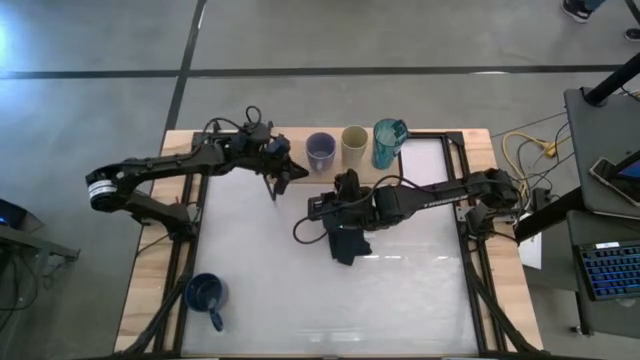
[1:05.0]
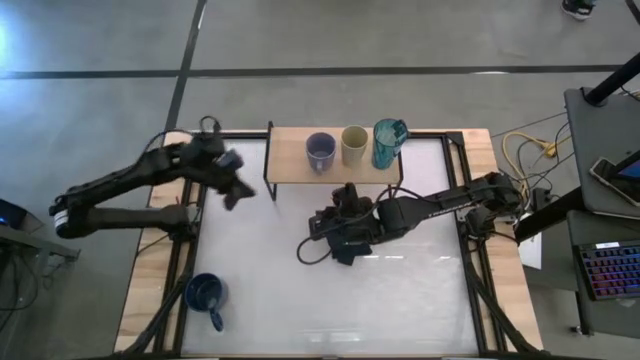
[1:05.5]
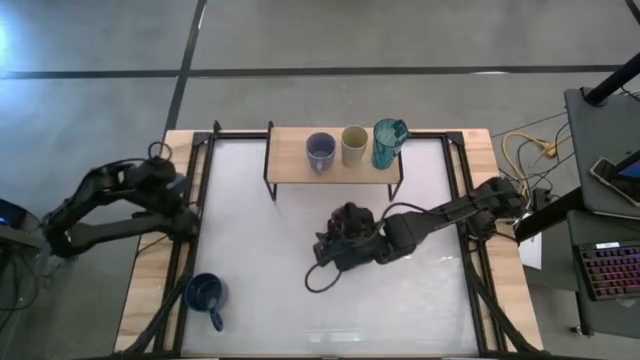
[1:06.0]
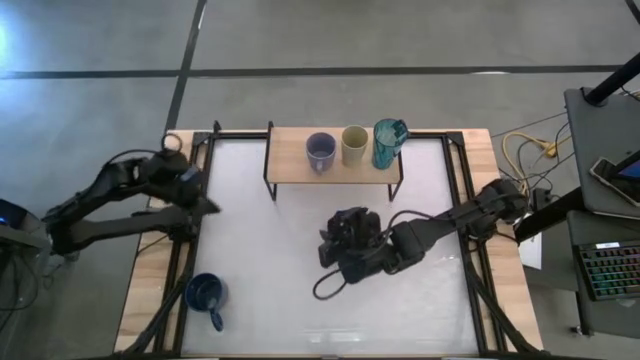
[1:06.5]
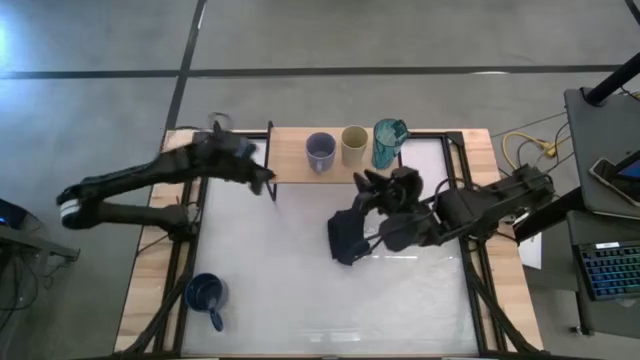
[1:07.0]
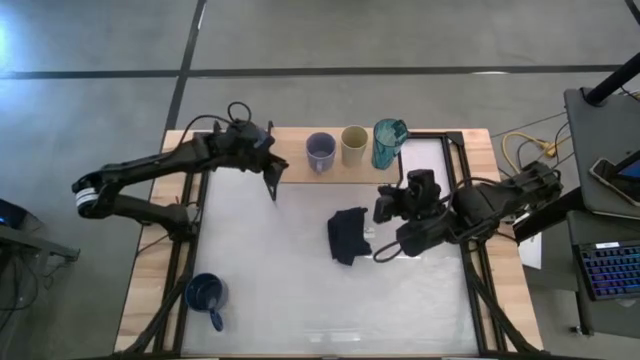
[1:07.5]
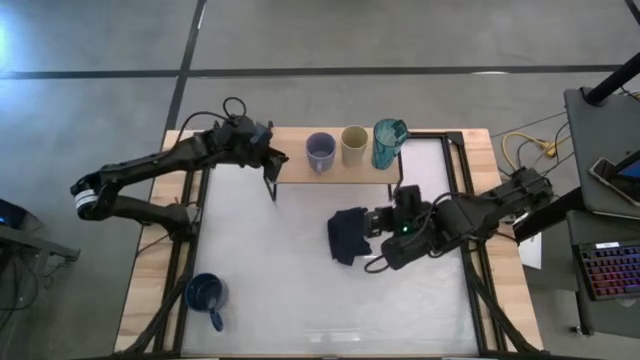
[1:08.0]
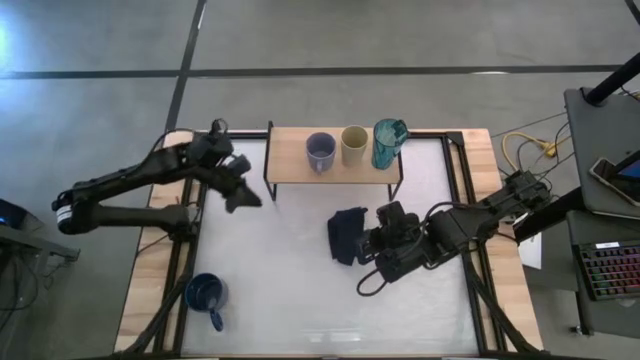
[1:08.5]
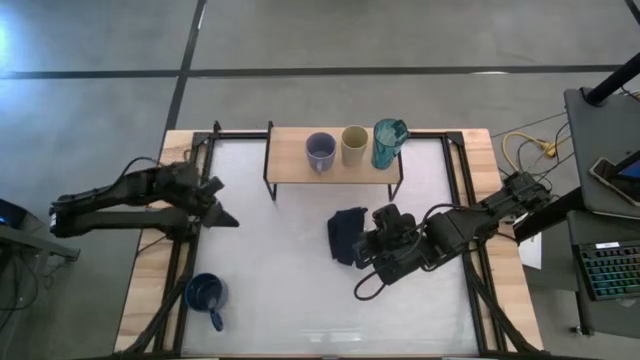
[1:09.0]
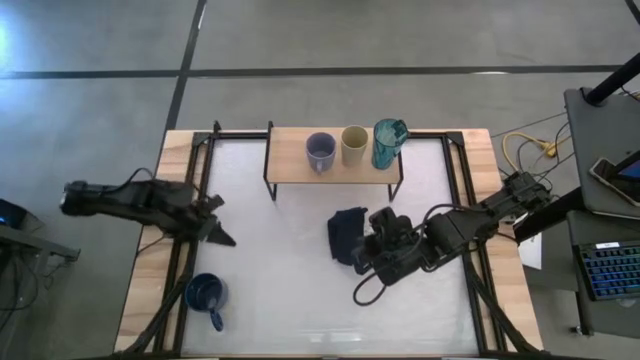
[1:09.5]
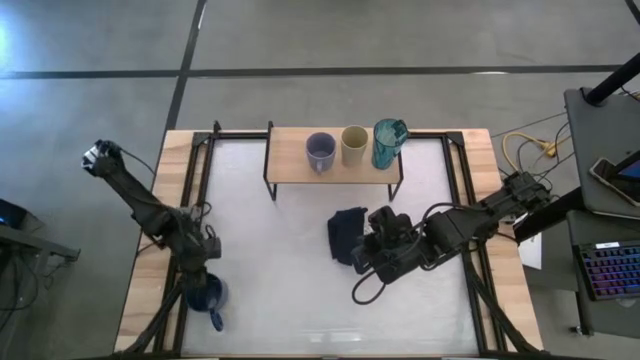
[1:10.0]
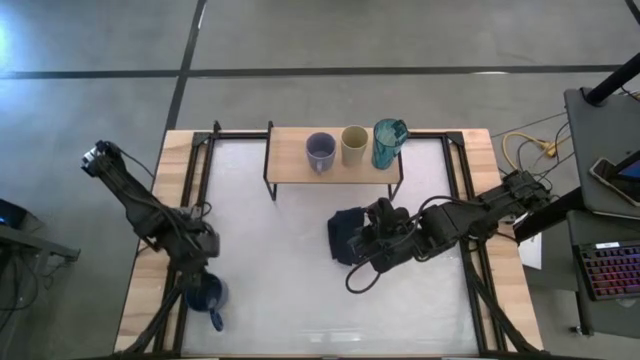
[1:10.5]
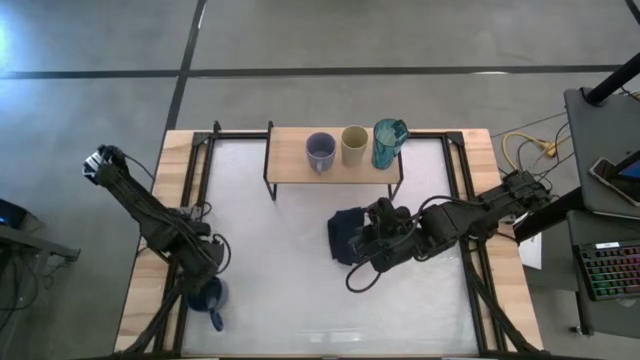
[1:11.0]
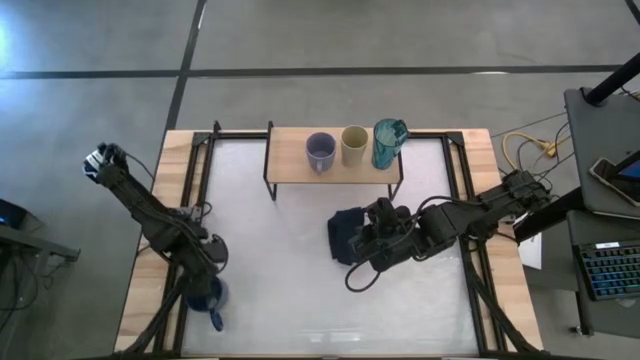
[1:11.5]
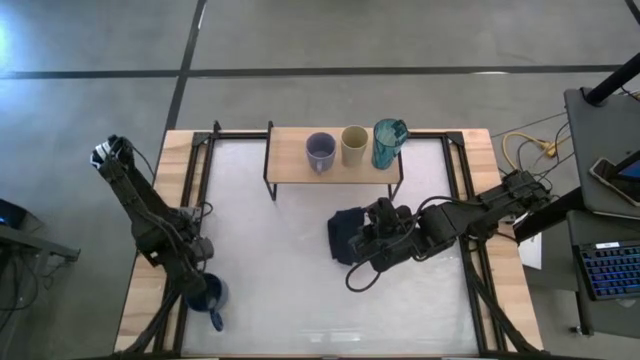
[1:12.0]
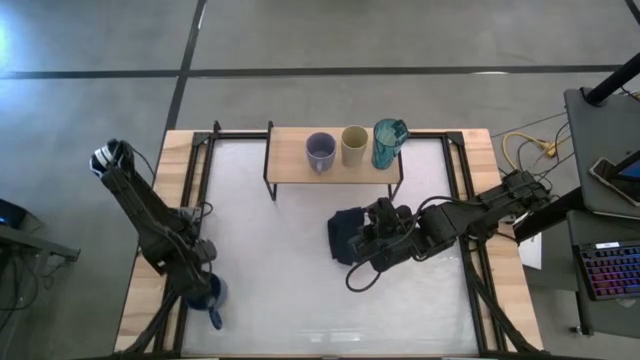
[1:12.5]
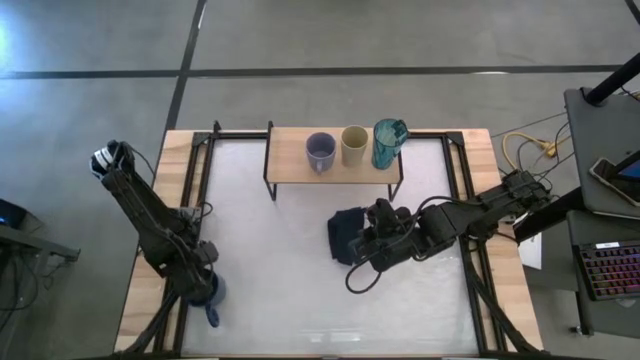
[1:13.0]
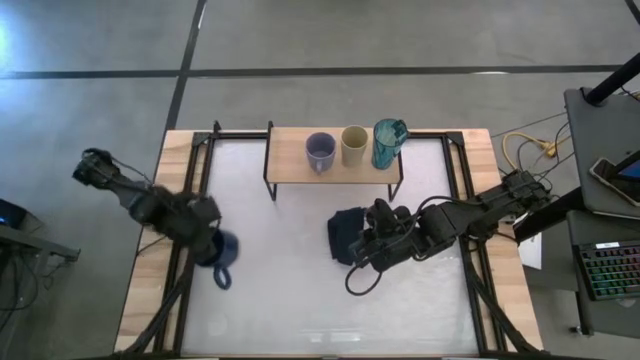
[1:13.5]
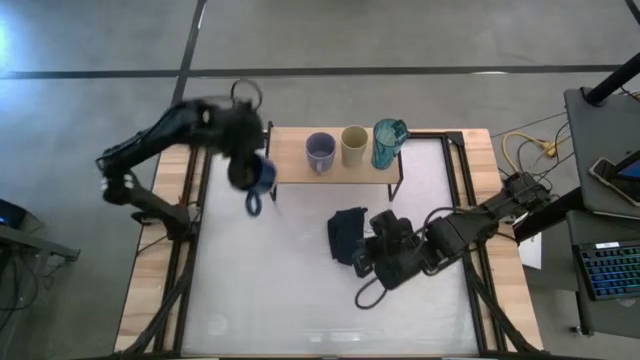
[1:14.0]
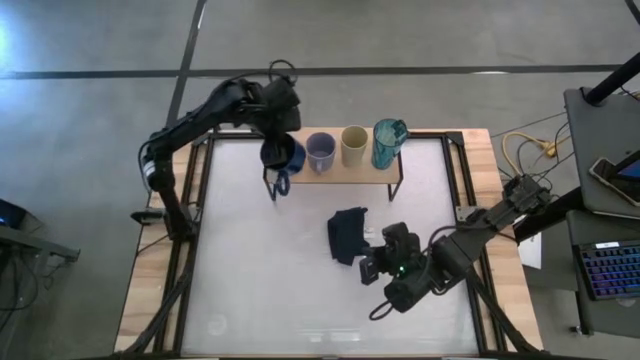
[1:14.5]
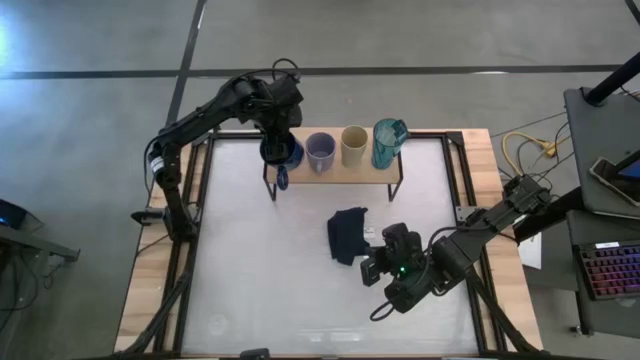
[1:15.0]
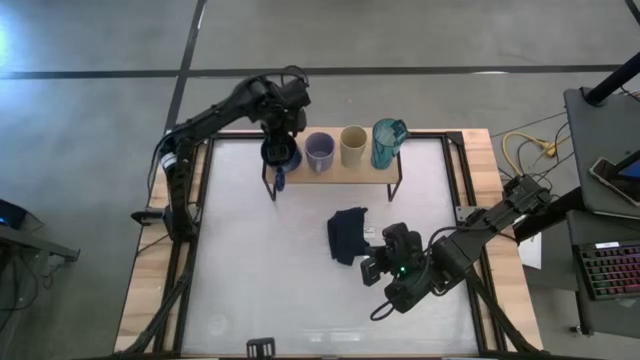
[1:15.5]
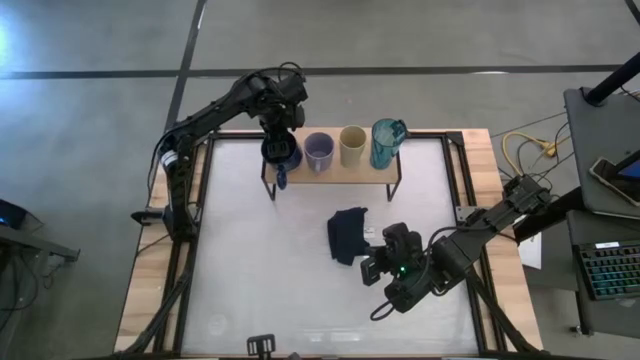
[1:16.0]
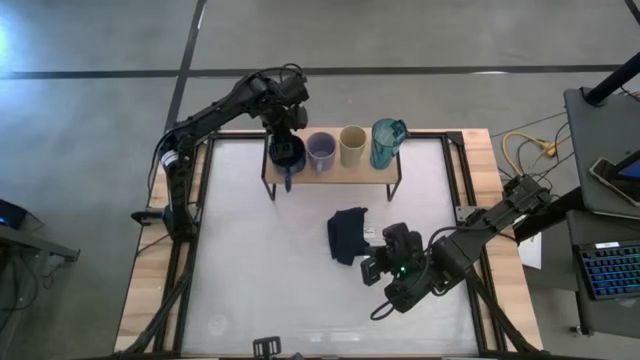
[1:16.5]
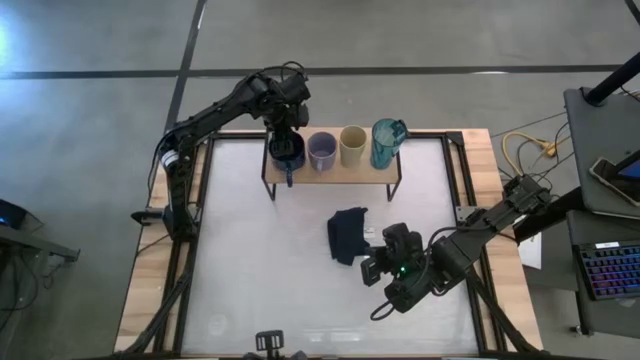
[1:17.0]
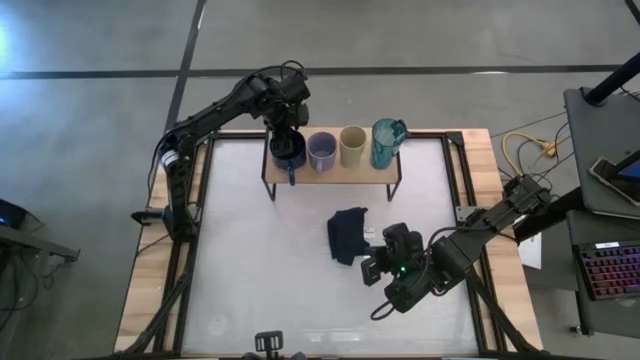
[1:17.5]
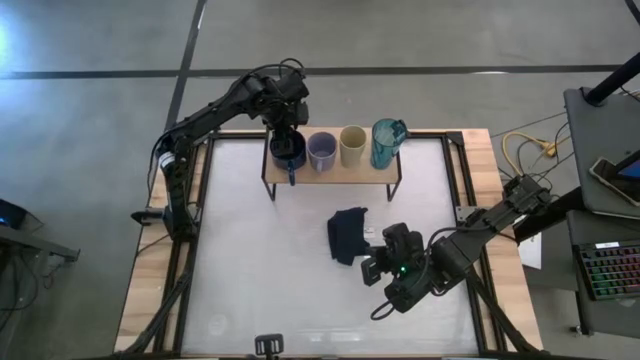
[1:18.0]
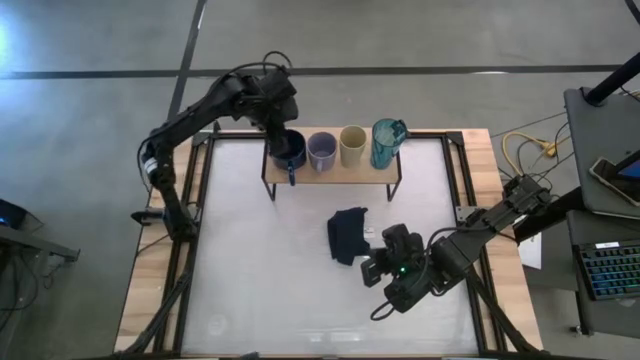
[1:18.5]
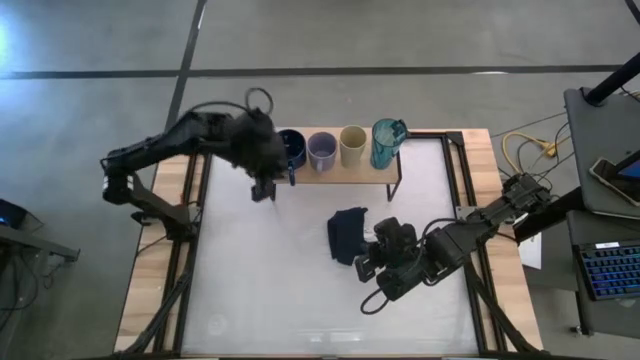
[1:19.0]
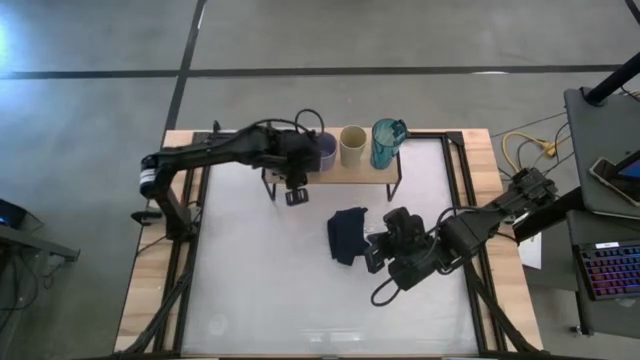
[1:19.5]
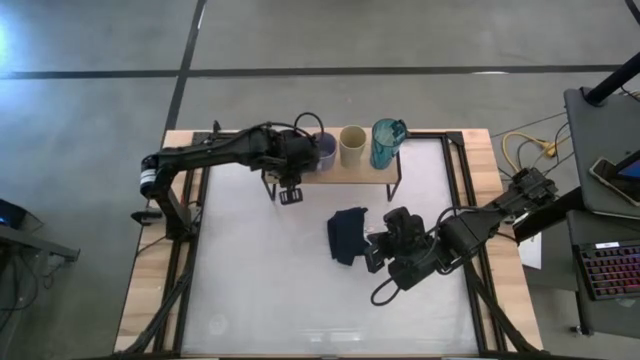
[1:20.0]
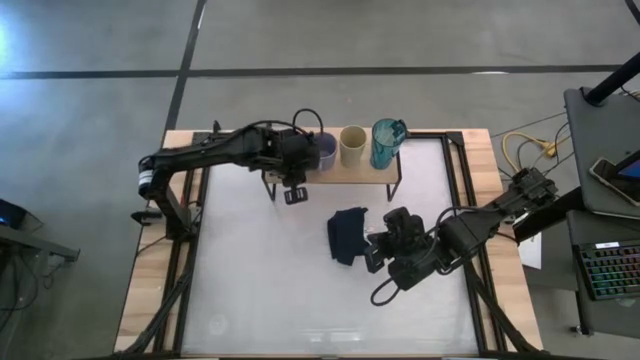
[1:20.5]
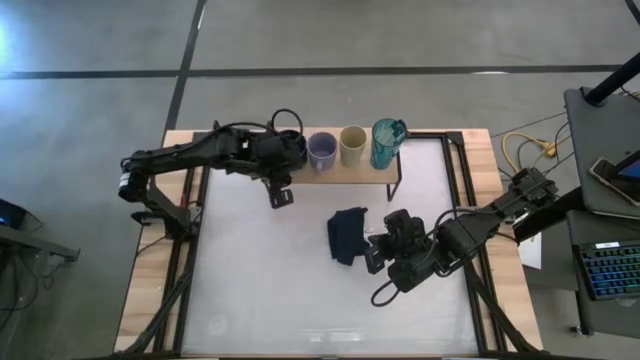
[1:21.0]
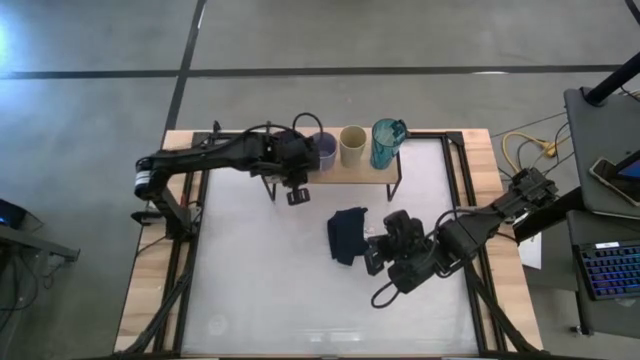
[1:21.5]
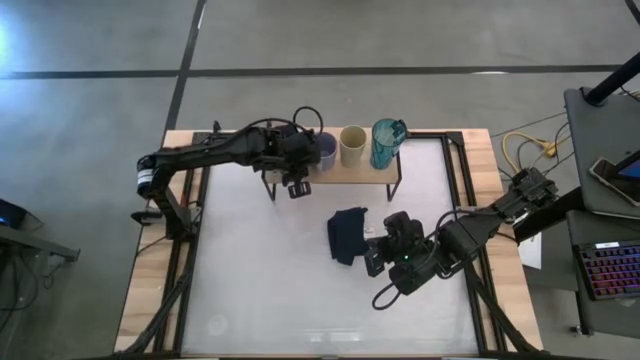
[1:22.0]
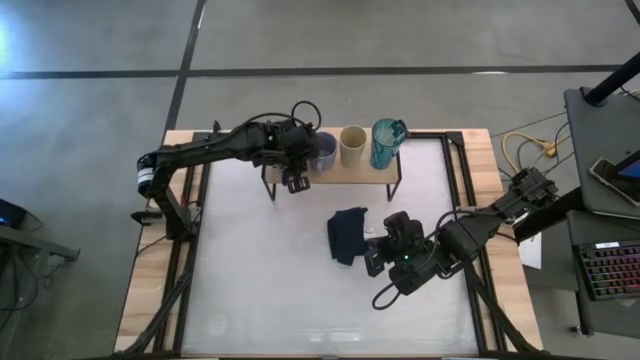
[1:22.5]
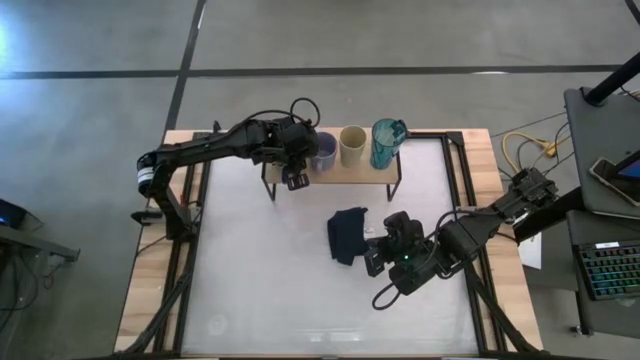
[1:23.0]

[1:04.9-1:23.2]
Task: Stack small to large cups/mugs on shelf
Put the dark blue mug on the shelf

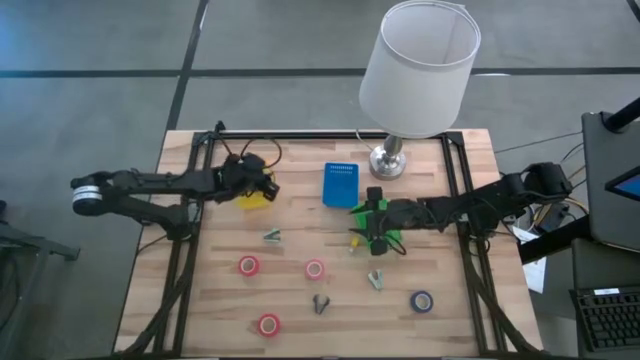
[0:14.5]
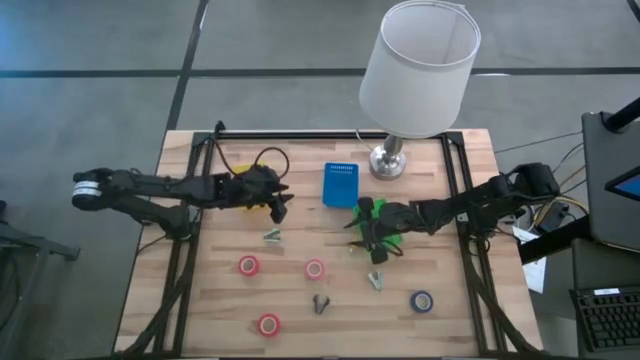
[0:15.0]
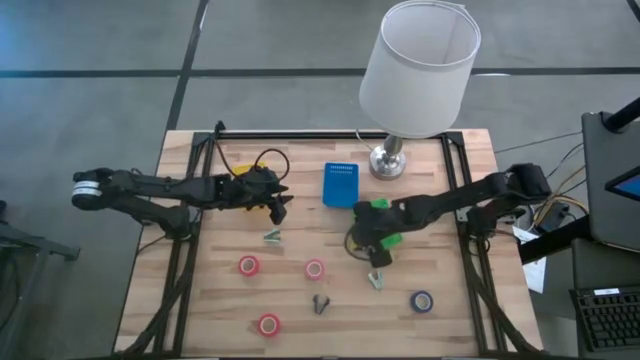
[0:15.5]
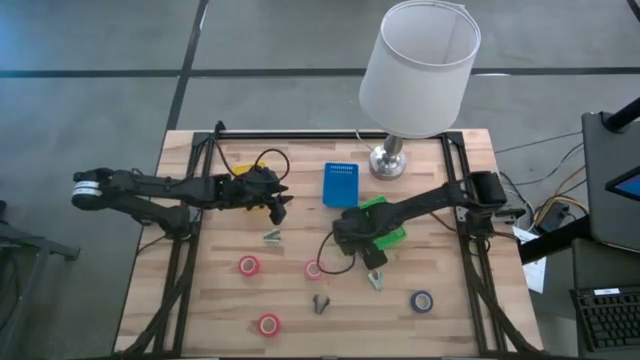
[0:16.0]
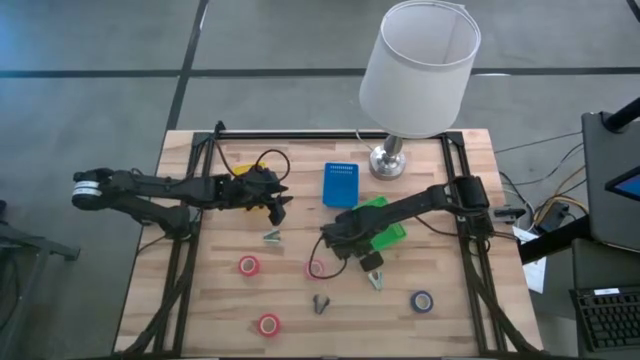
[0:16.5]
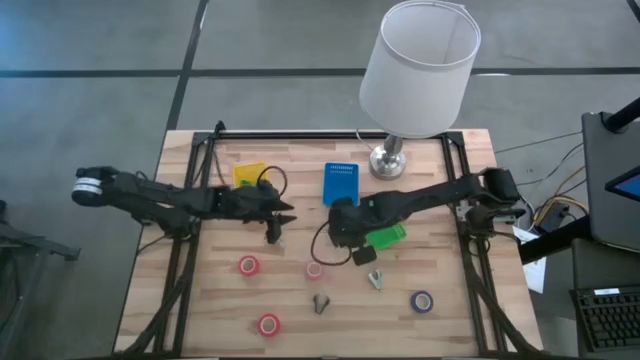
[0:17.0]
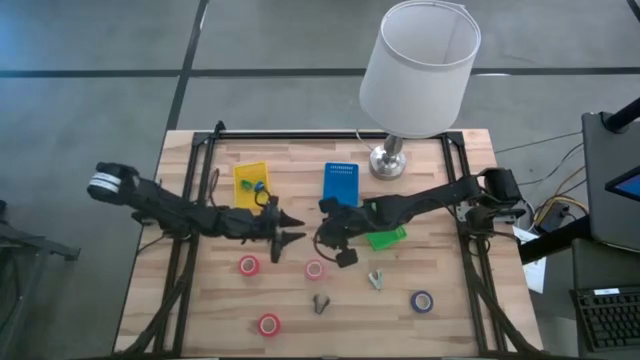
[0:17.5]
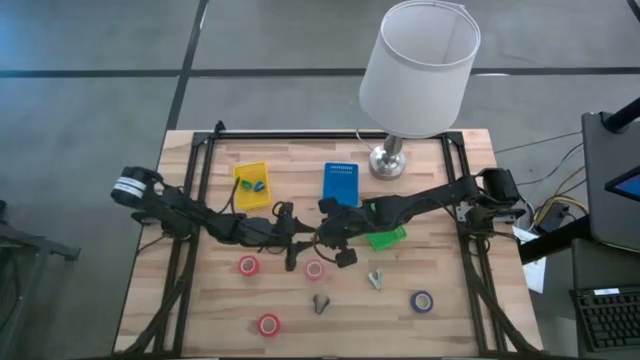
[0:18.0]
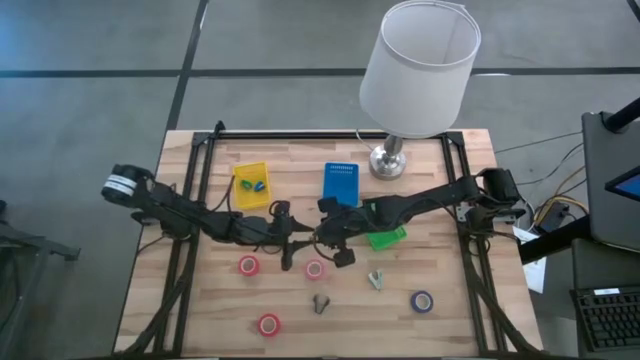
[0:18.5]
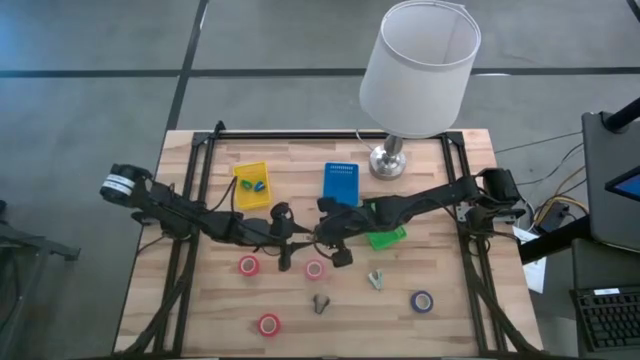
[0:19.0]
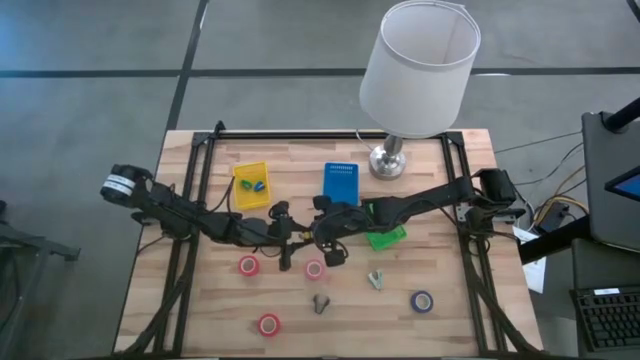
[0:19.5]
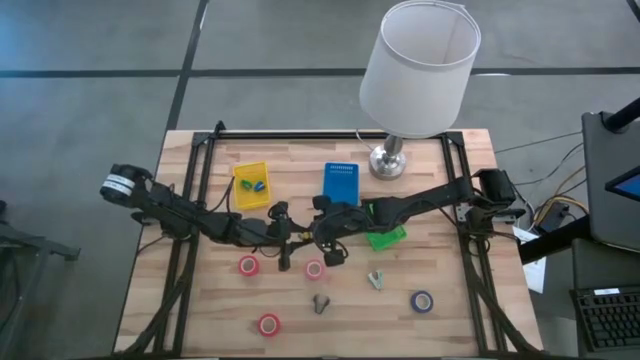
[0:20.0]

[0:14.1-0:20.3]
Task: Pick and place Stapler, Stapler remover, tape
Put the yellow stapler into the yellow basket
